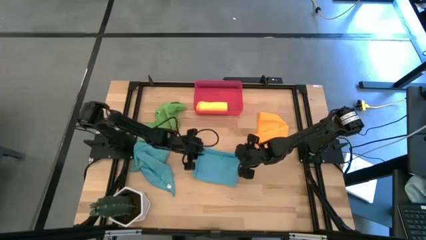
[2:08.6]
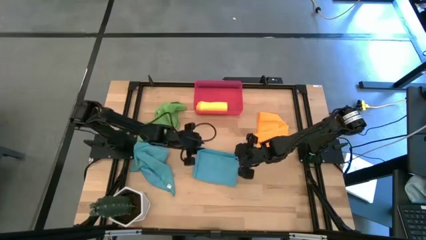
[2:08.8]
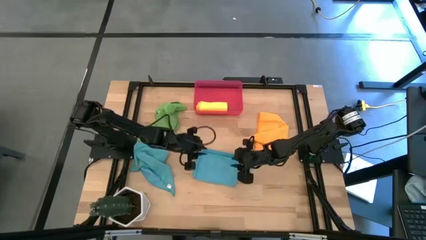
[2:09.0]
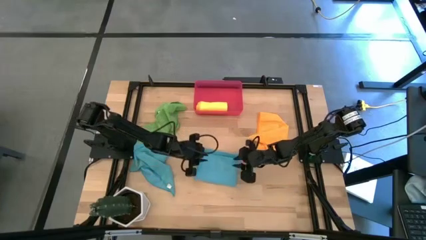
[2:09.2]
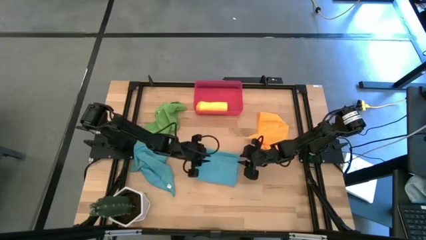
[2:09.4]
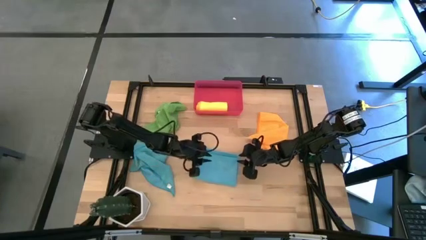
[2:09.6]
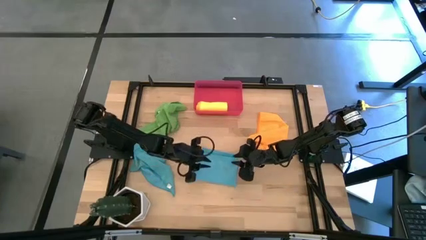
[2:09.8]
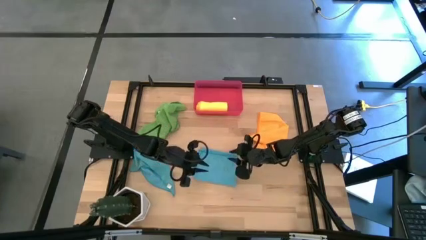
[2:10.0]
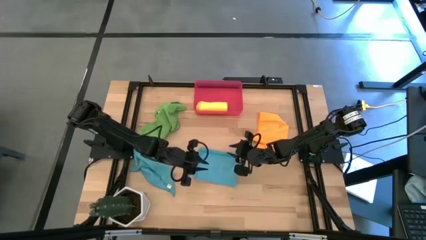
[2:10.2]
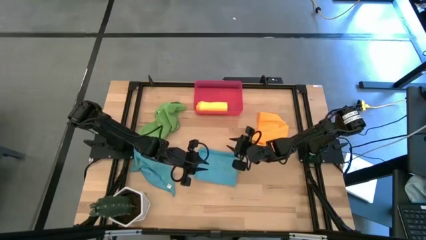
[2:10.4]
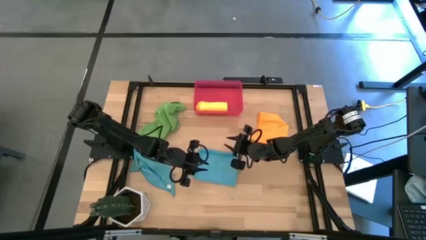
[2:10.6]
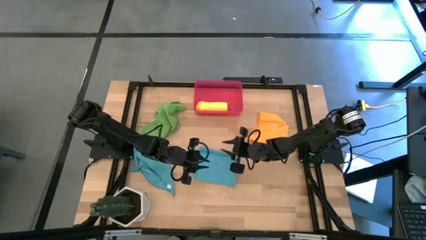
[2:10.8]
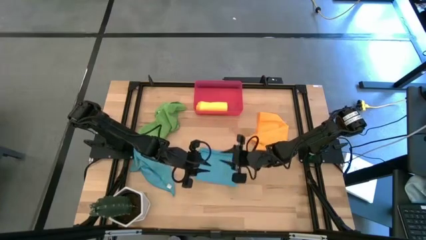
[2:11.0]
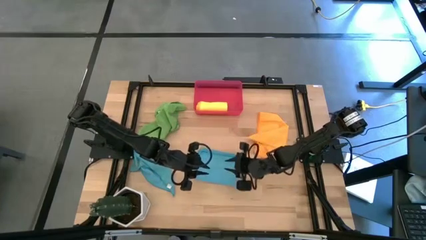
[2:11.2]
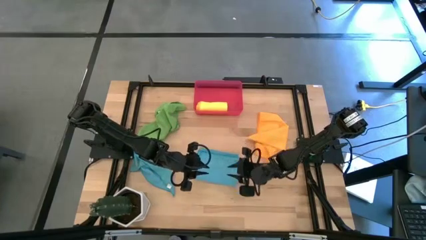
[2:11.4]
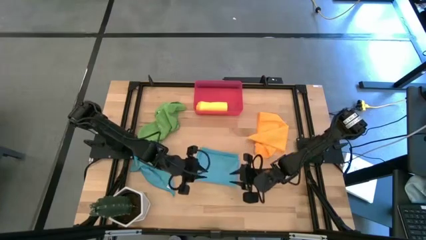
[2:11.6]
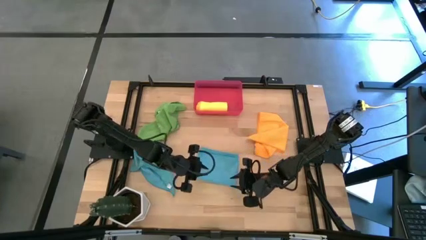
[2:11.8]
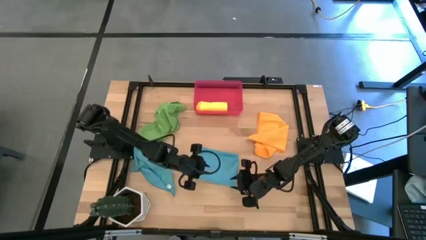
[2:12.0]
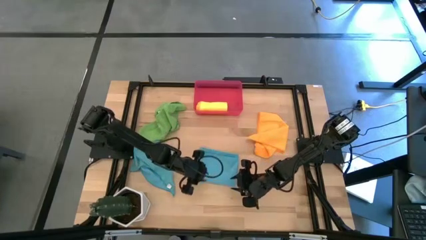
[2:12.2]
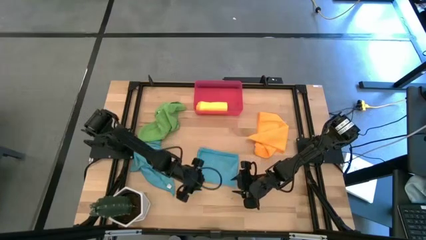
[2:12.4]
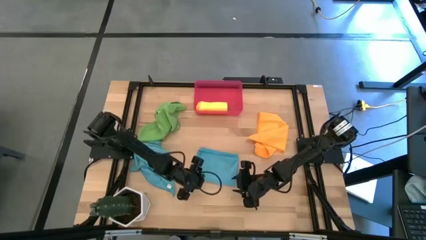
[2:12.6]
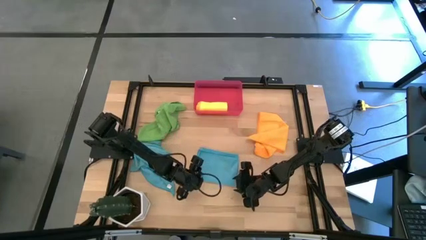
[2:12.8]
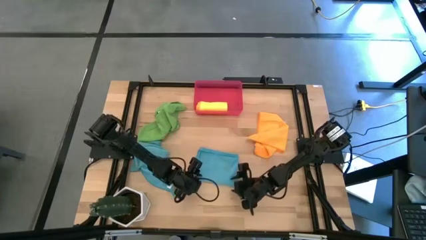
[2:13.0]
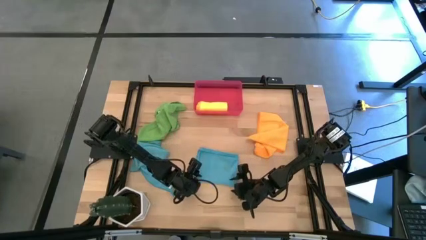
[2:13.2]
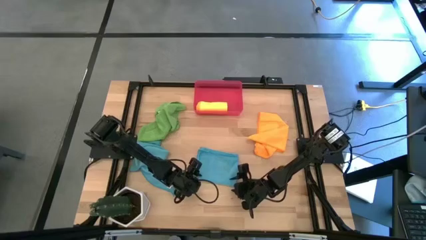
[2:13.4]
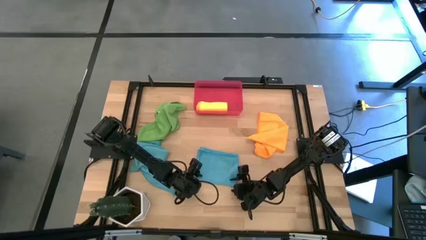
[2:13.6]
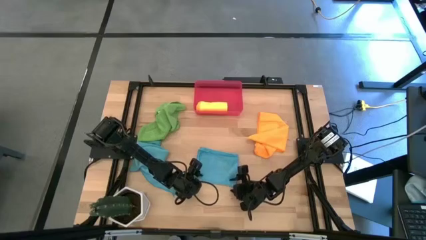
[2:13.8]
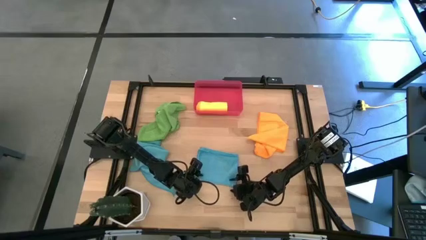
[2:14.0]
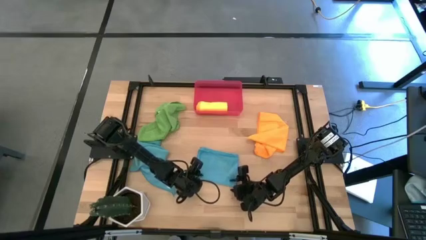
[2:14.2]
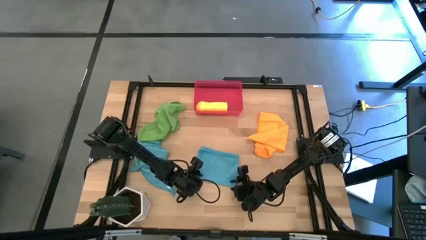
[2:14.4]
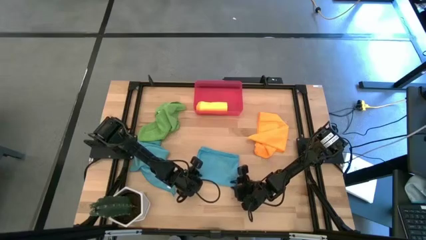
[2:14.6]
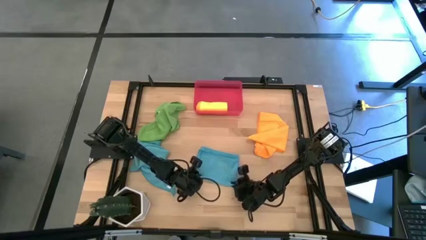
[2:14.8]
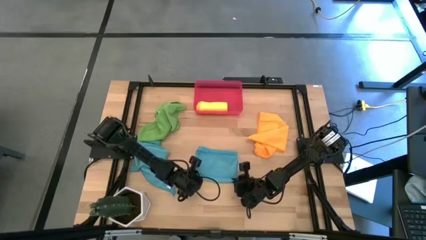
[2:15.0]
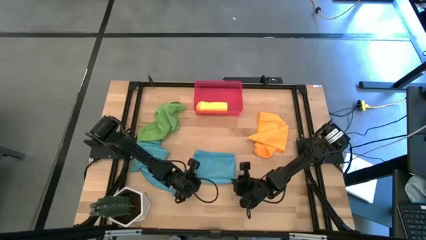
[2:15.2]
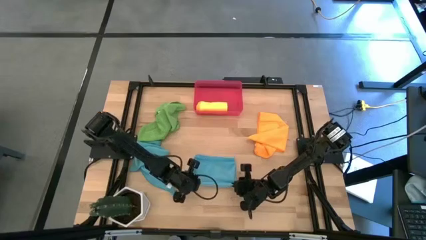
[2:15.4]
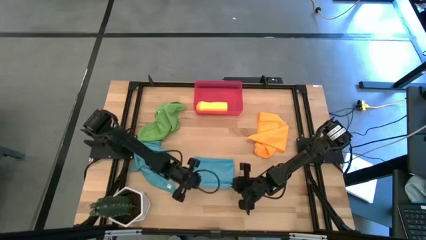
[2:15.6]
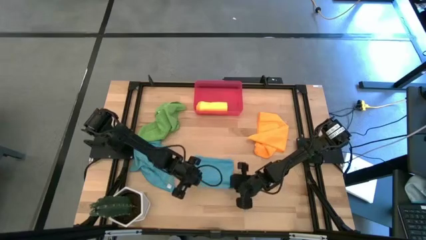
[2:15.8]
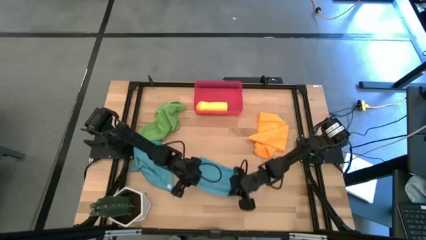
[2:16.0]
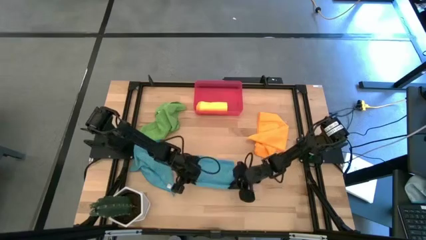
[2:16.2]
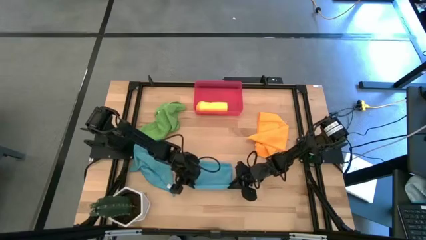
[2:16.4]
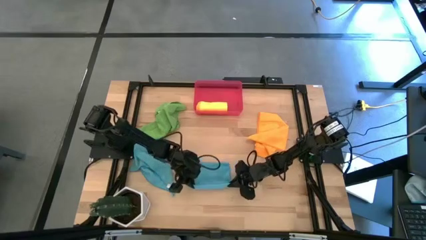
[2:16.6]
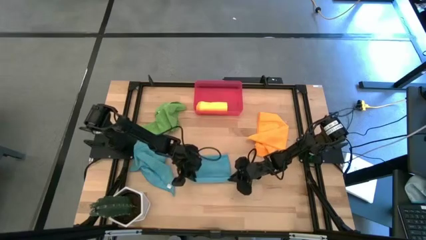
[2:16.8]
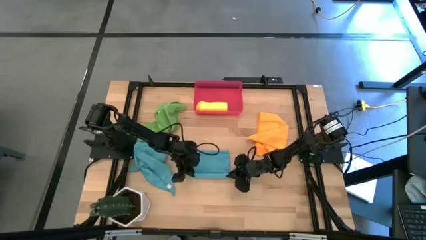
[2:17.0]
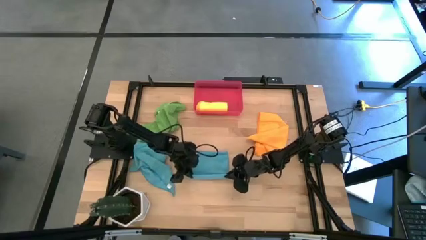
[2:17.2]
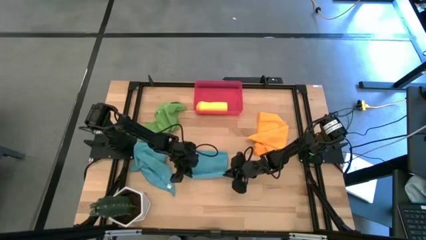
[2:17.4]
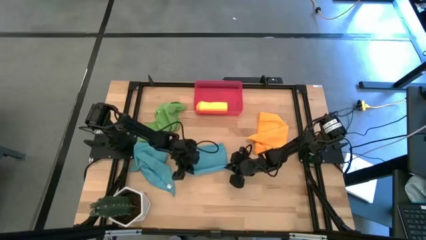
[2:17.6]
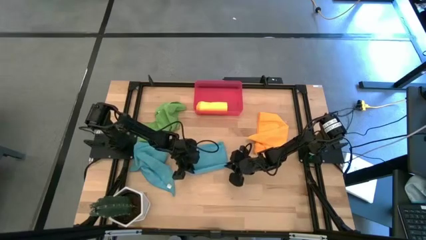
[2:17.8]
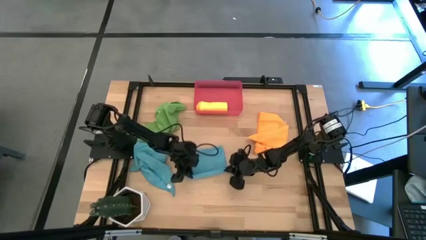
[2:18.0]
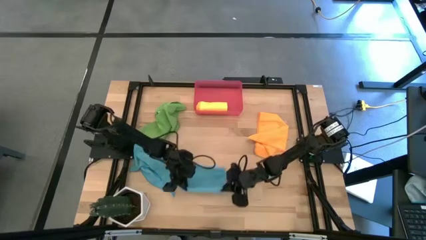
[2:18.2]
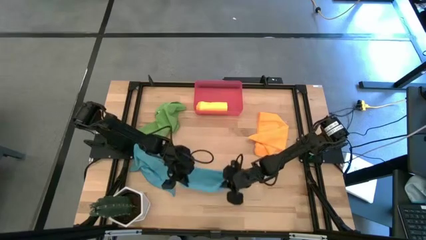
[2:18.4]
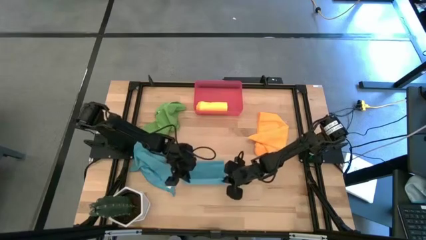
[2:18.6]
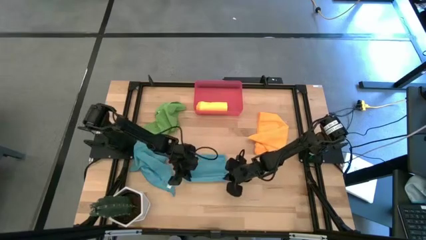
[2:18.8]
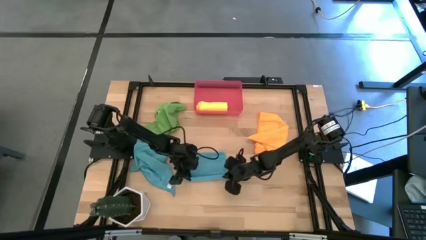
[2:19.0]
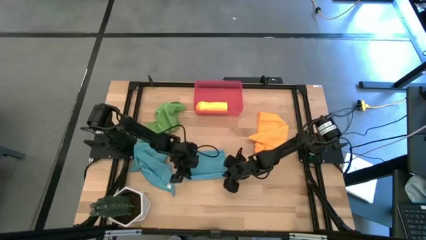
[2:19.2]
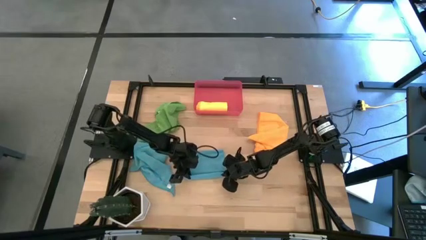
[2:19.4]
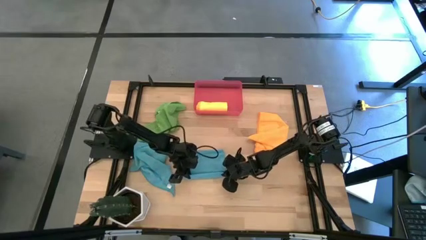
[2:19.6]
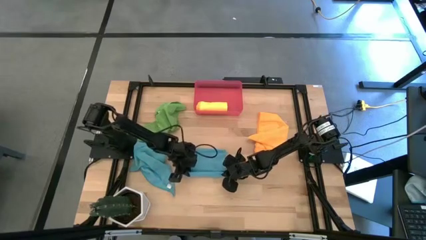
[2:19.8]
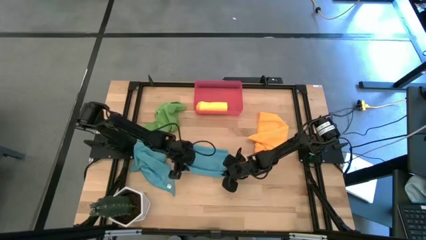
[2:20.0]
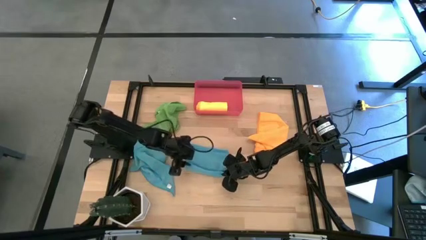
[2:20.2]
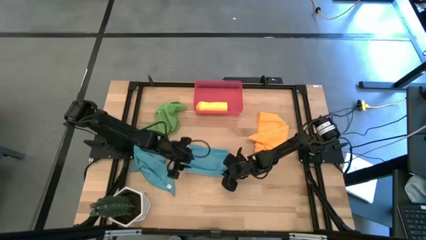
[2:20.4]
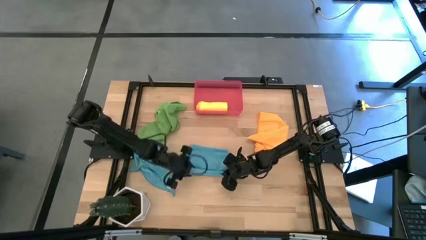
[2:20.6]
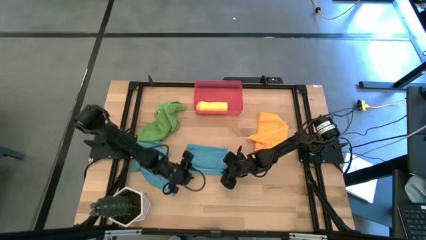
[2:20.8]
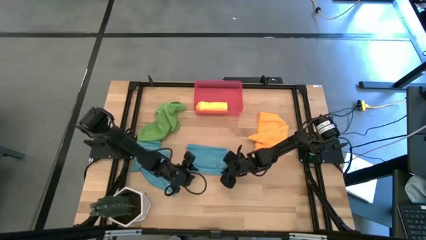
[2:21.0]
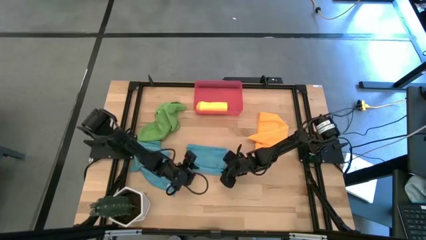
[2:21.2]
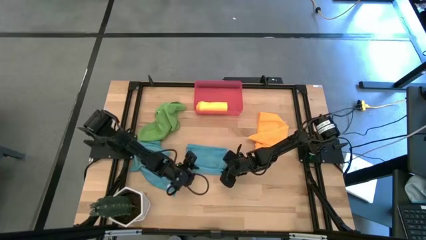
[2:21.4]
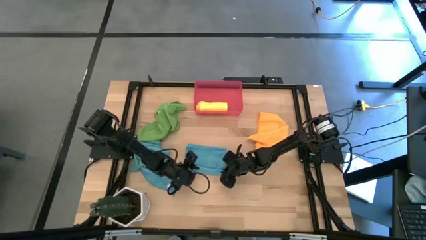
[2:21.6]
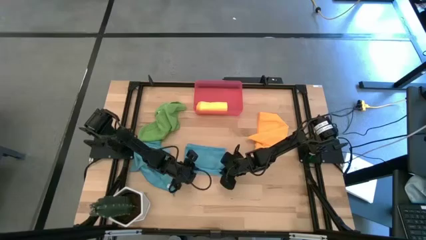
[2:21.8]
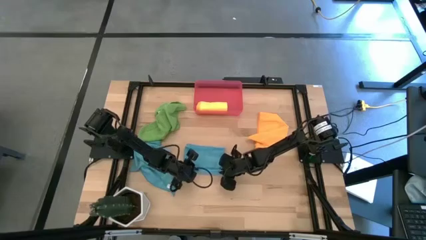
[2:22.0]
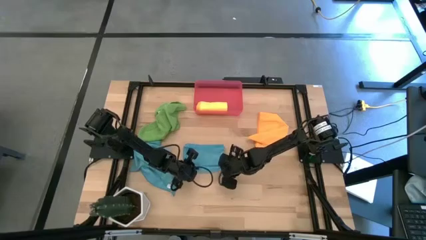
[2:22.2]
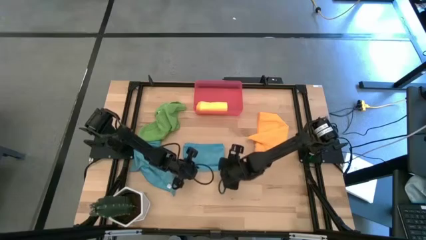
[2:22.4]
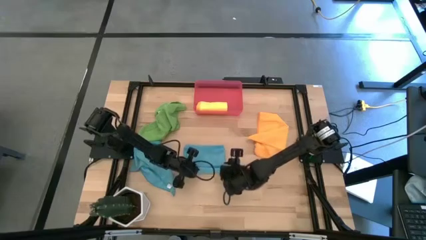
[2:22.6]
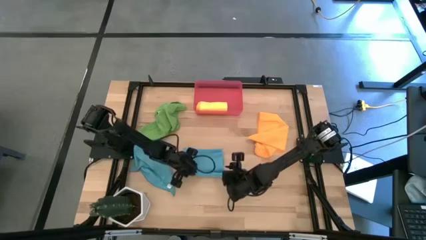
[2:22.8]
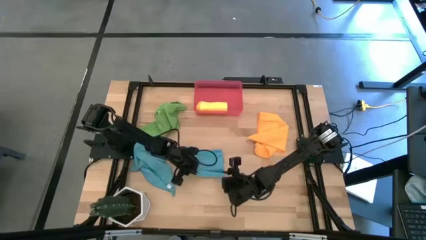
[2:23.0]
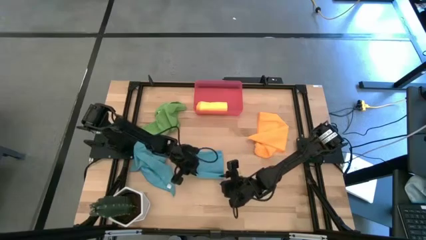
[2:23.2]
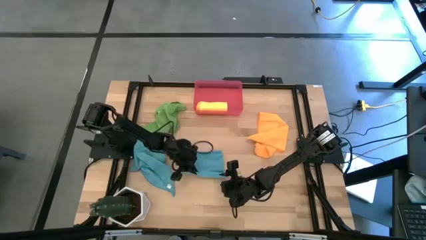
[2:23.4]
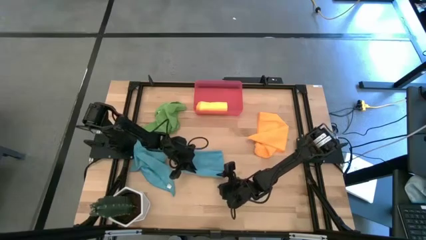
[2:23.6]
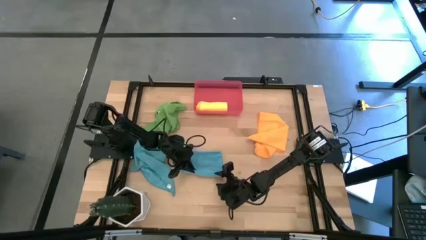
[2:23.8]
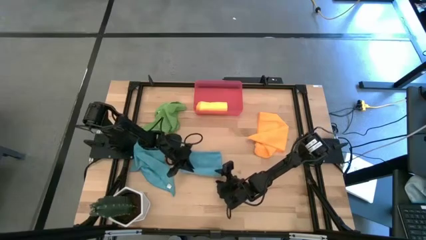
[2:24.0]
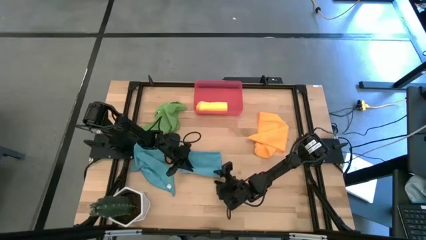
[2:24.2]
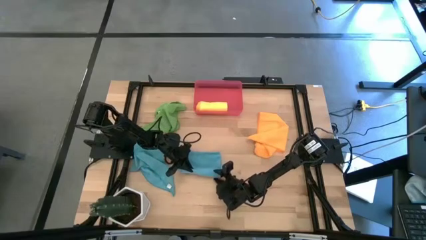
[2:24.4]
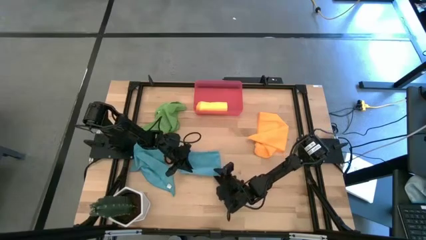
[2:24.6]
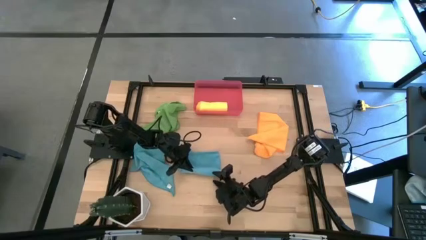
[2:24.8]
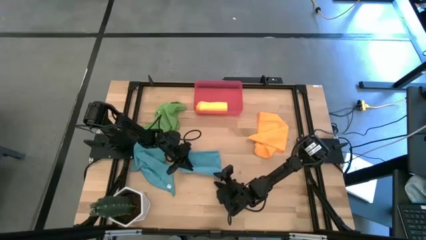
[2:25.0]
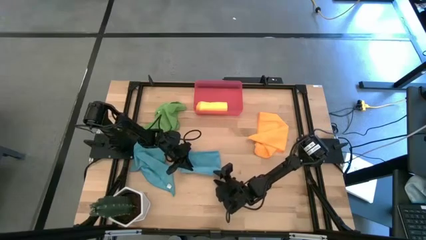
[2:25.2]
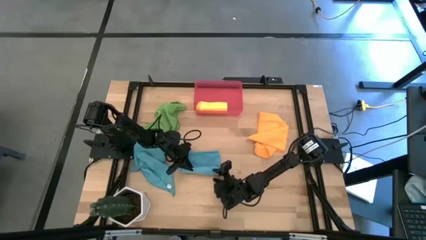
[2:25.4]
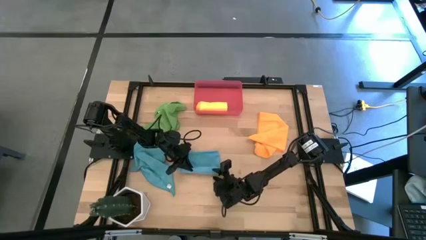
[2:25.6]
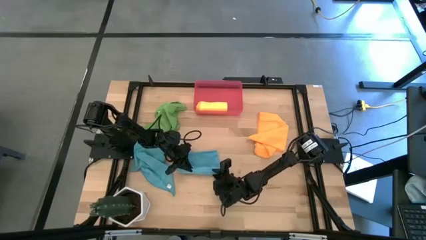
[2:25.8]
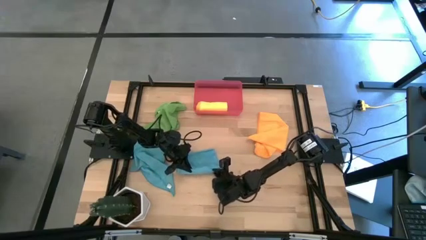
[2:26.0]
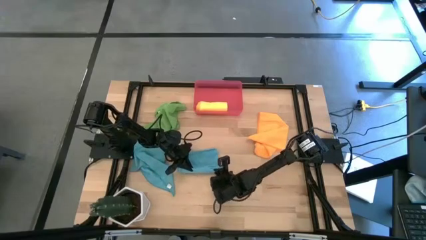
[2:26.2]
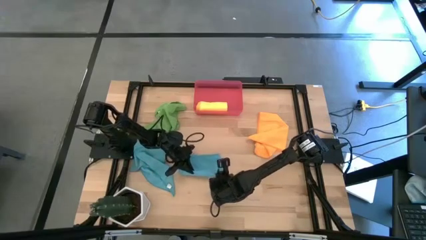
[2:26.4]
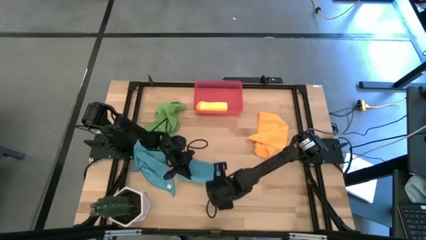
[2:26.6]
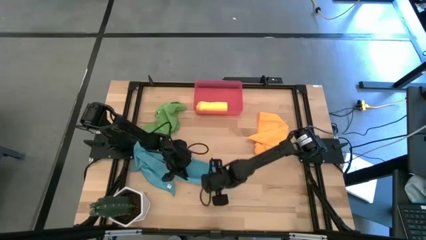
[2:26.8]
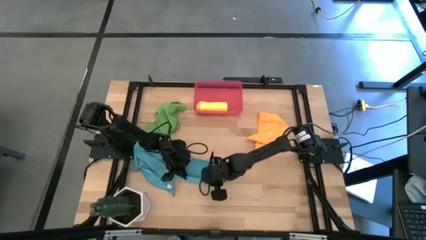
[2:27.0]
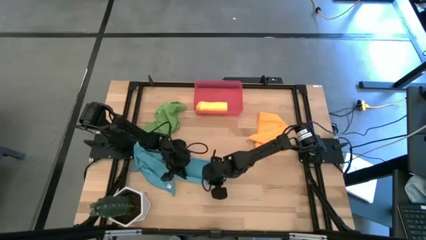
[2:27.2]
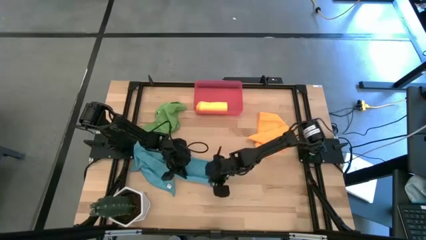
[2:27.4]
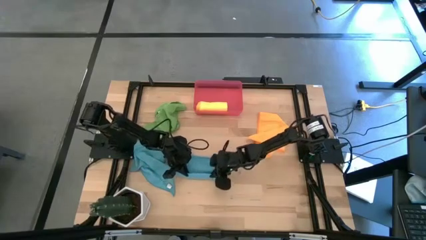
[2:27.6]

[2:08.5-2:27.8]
Task: Roll microfiber towels into tight, uniform cylinder then place into a basket
Roll the left blue microfiber cloth
